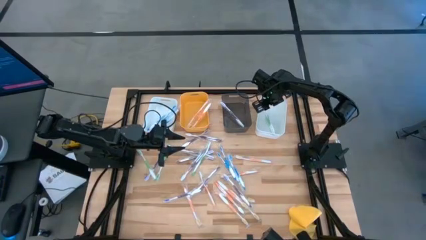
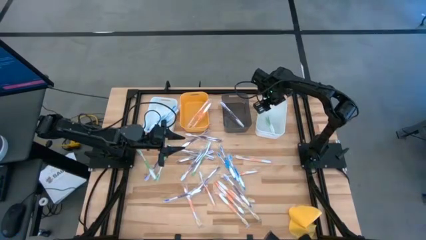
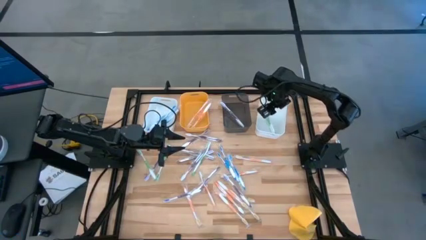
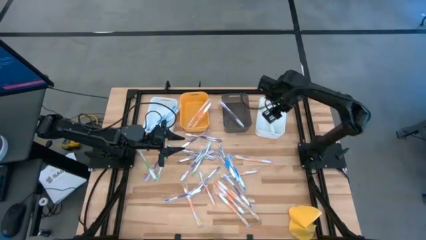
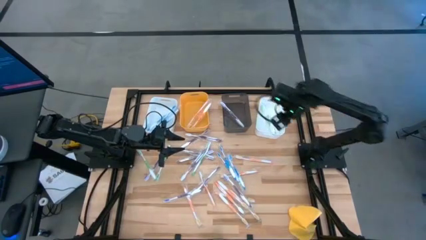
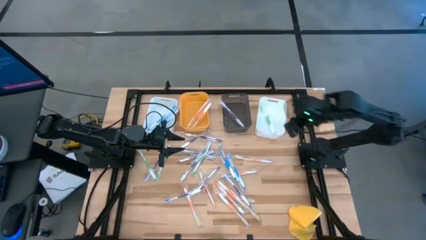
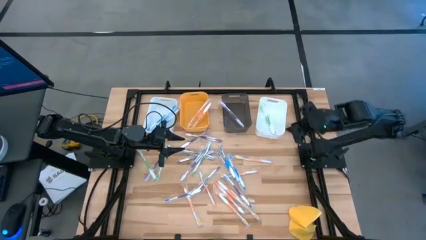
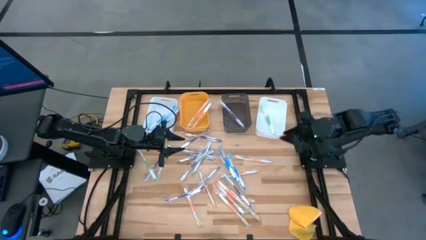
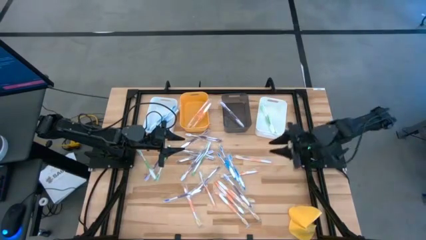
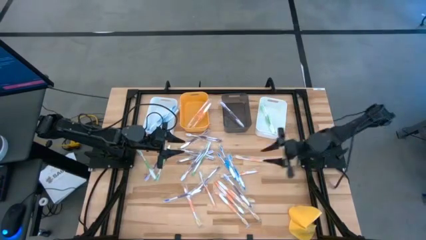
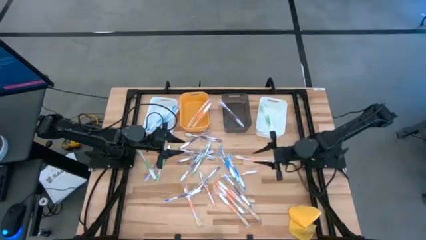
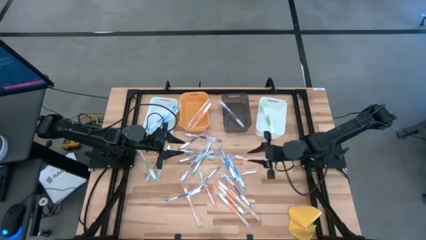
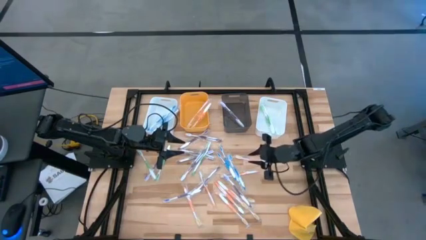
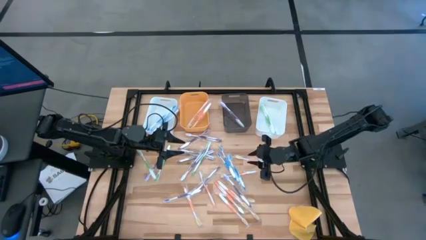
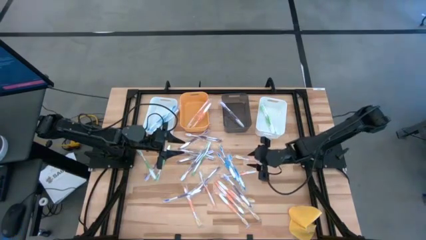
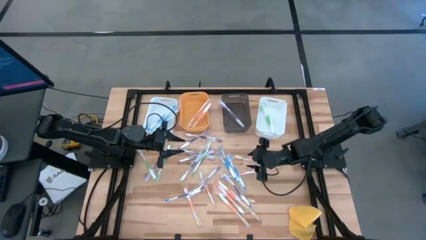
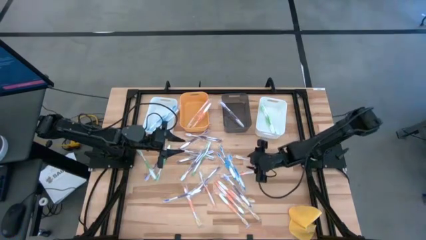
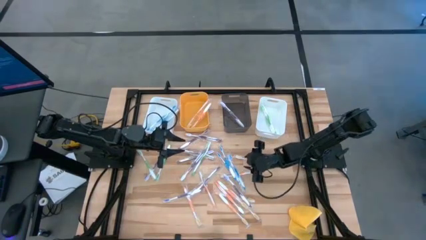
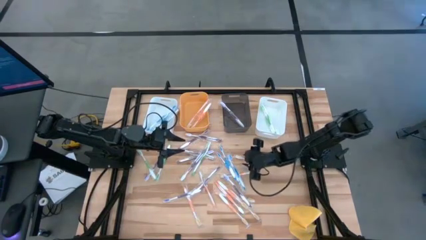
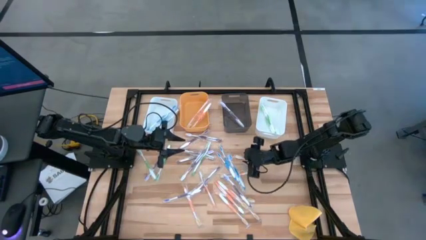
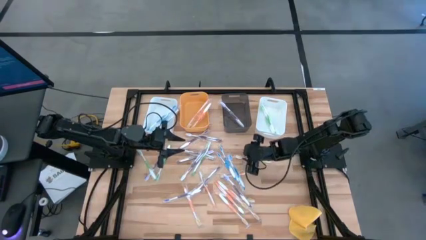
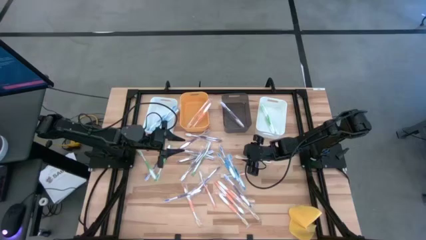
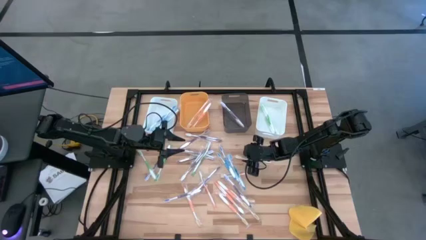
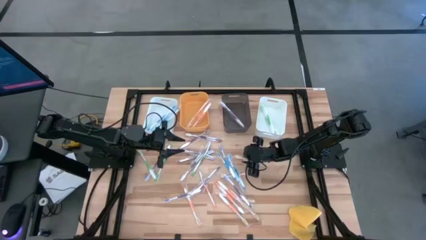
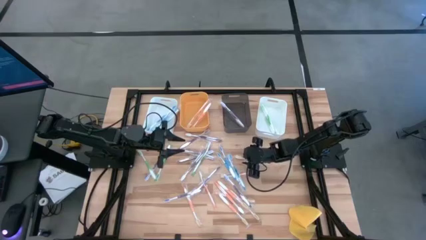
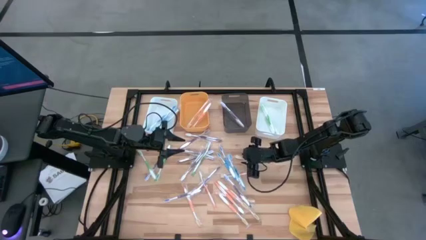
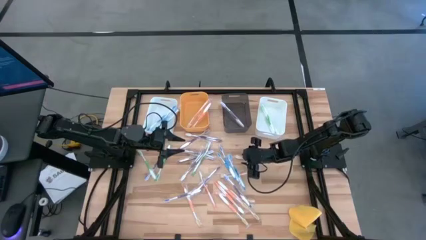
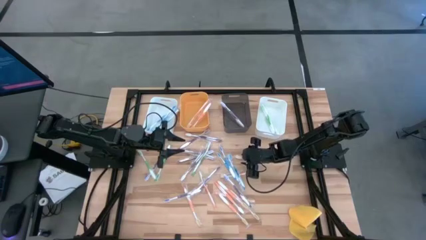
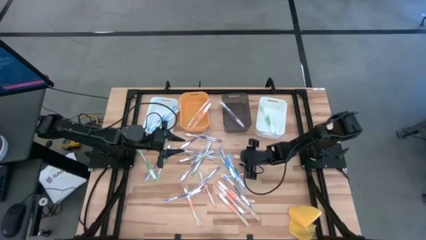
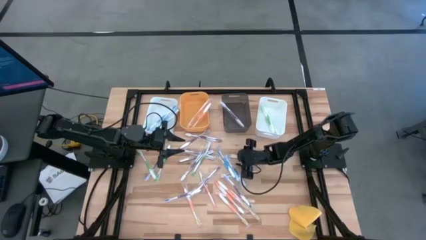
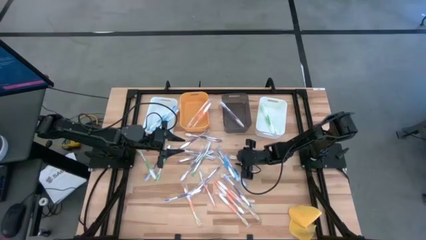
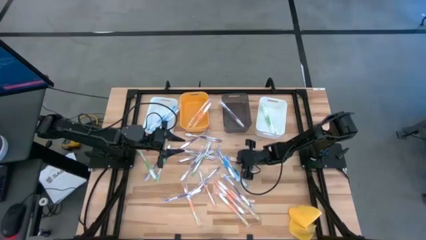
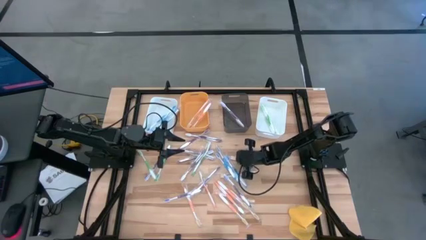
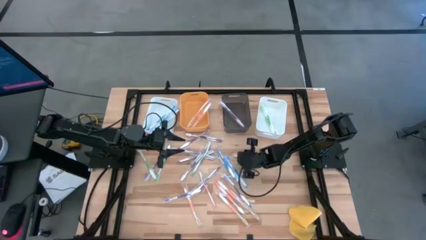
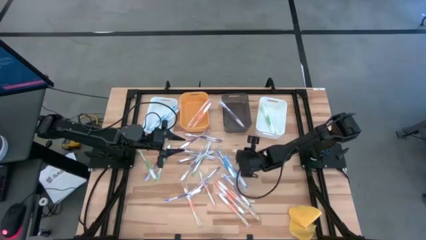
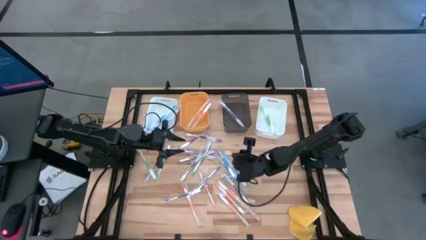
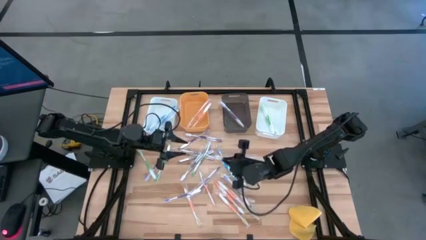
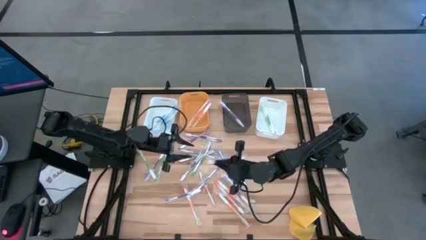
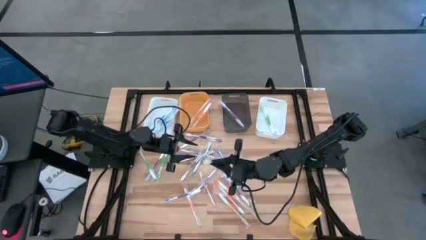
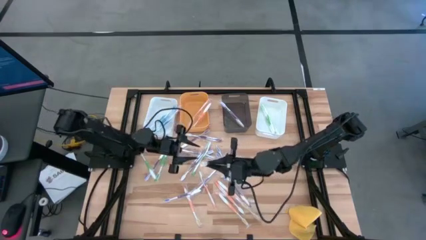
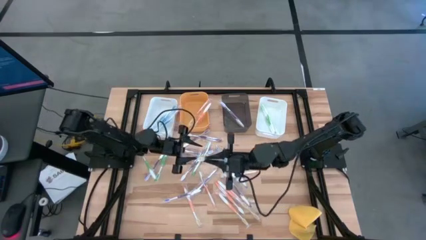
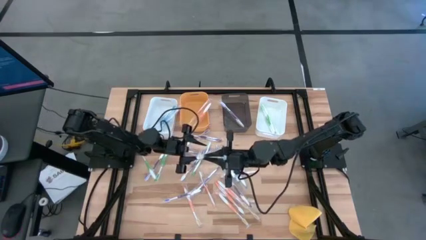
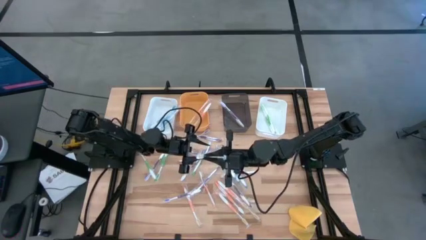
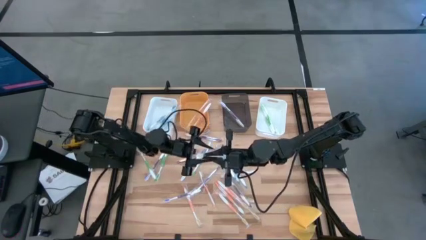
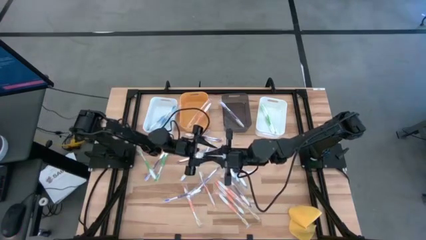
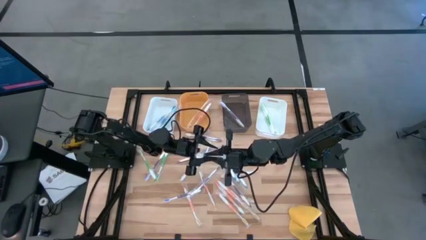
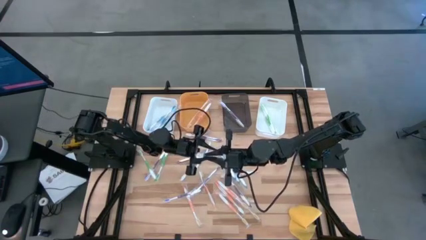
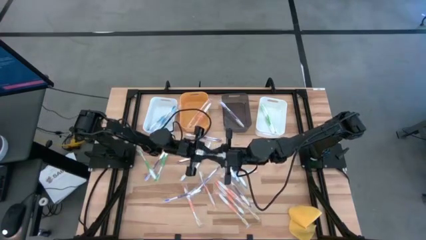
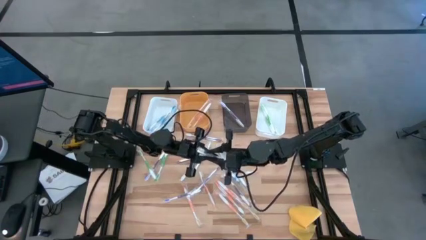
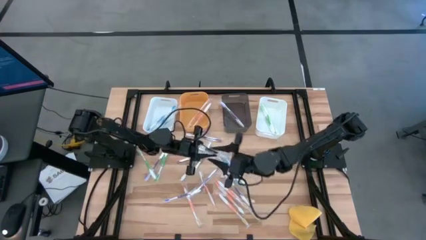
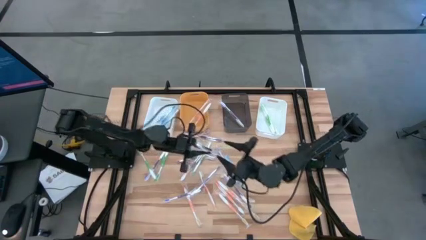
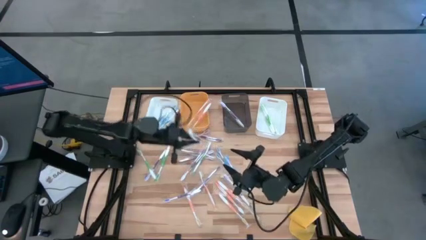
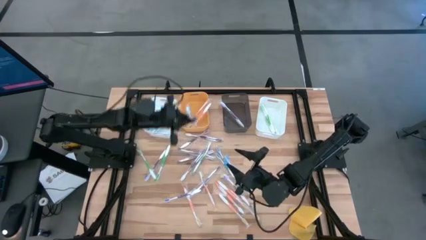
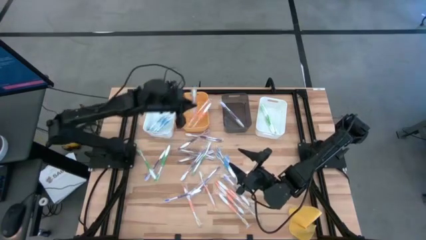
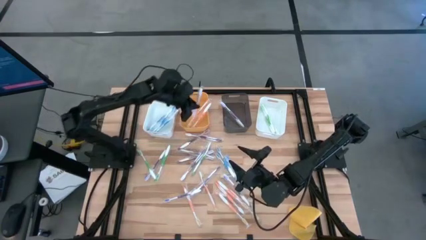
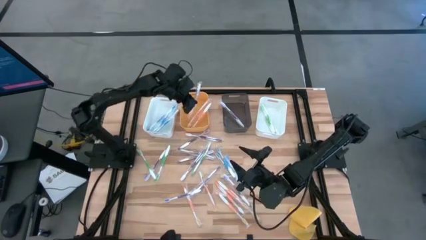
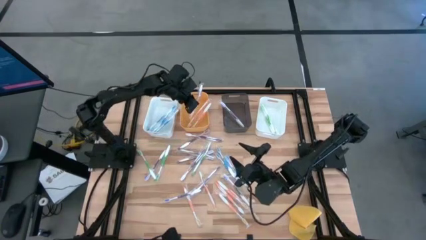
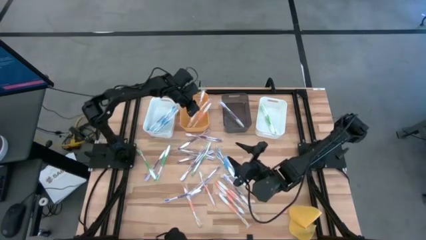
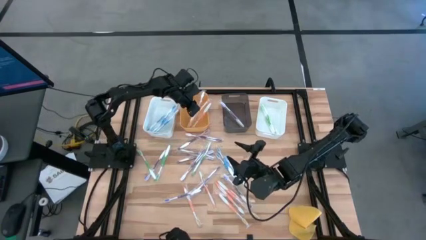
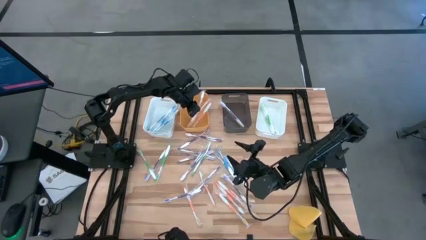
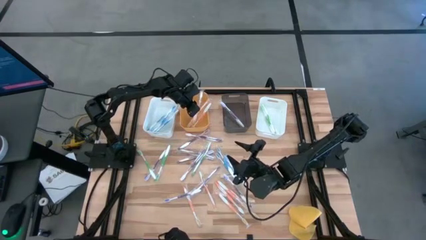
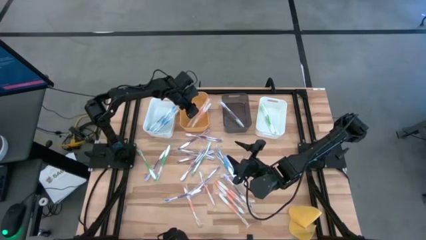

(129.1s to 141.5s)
Task: Pick & Place Toothbrushes
Put the orange toothbrush into the yellow bin

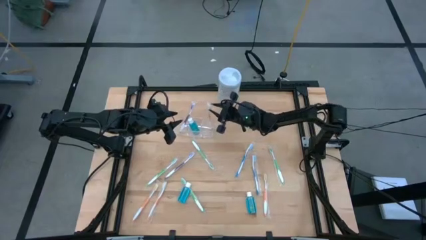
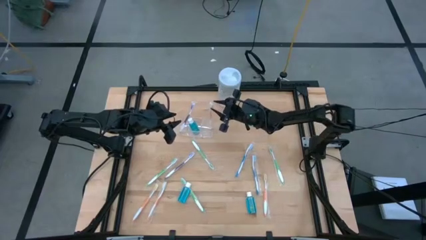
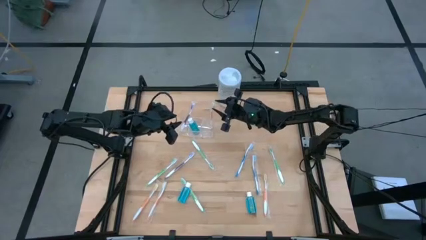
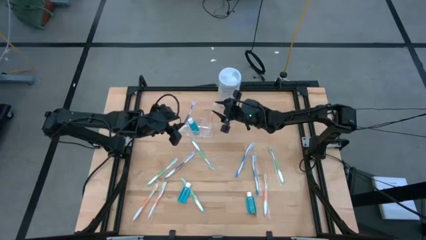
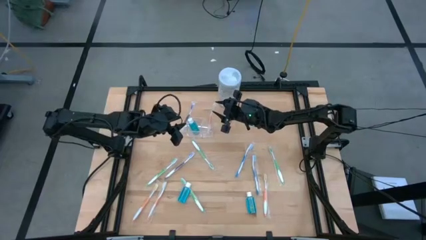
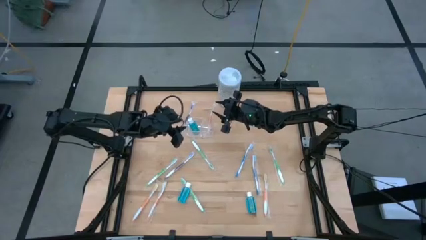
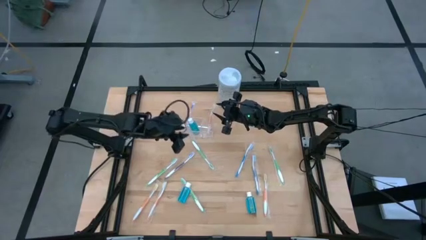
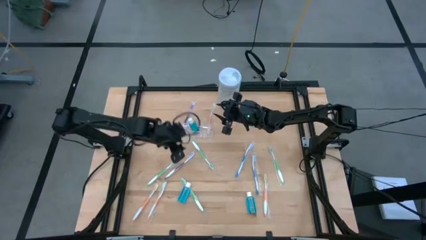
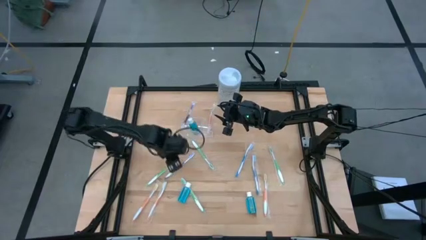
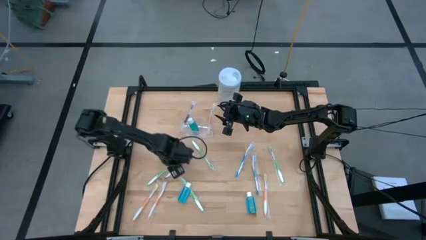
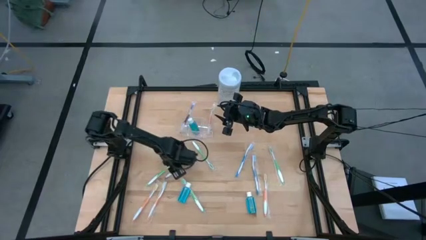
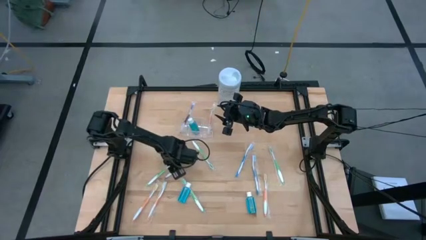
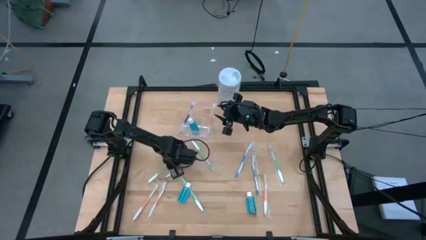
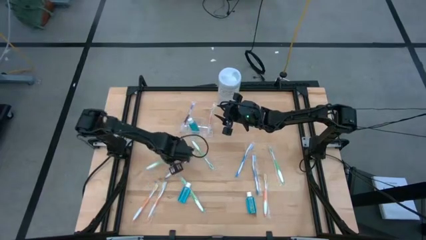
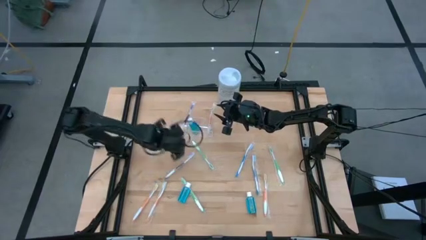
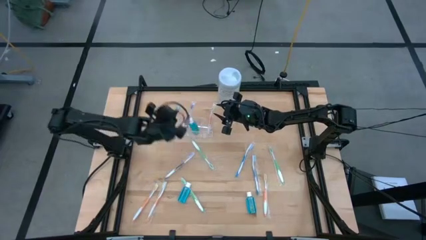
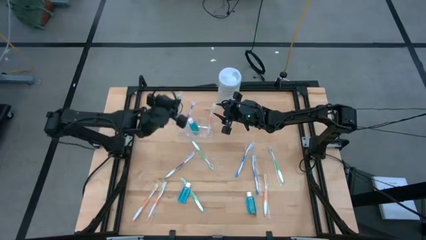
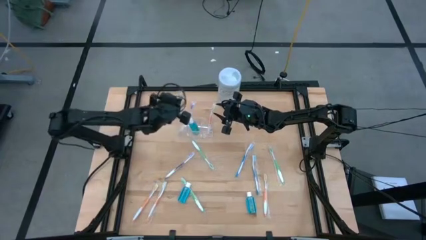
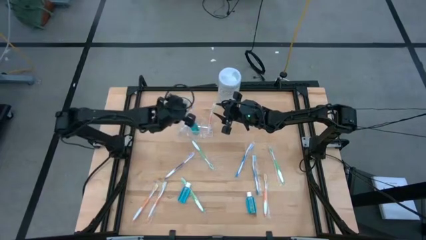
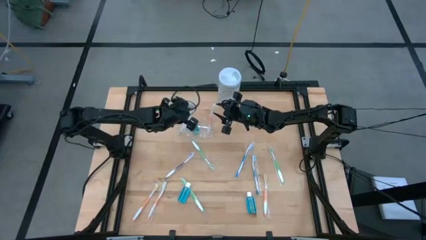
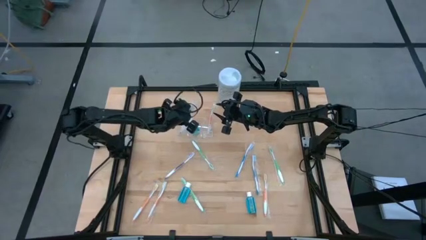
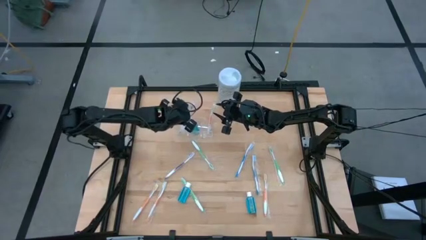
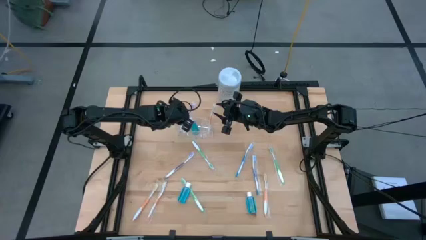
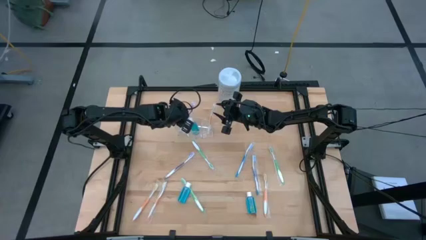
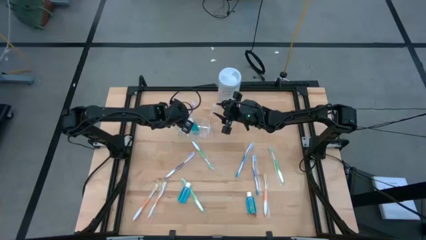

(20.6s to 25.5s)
Task: Pick & Place toothbrushing station
Put the green toothbrush into the transparent organizer
